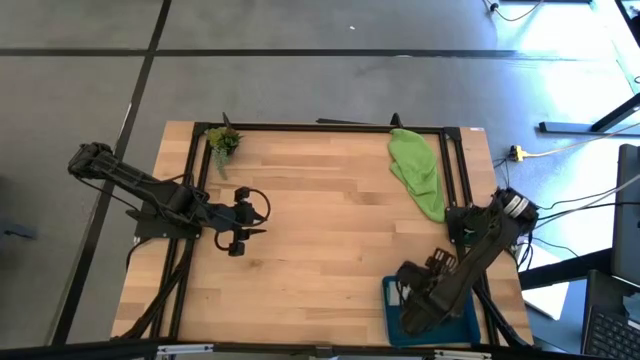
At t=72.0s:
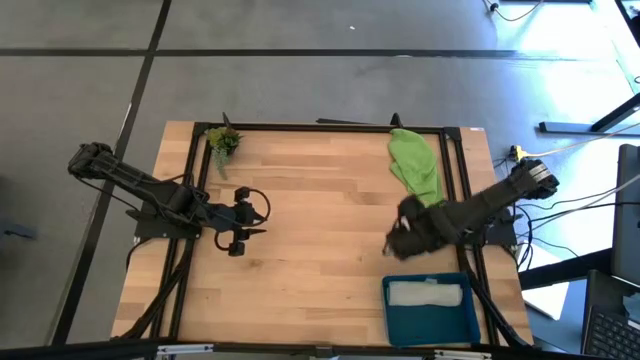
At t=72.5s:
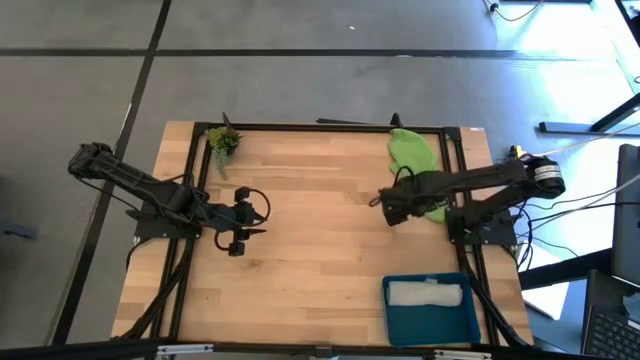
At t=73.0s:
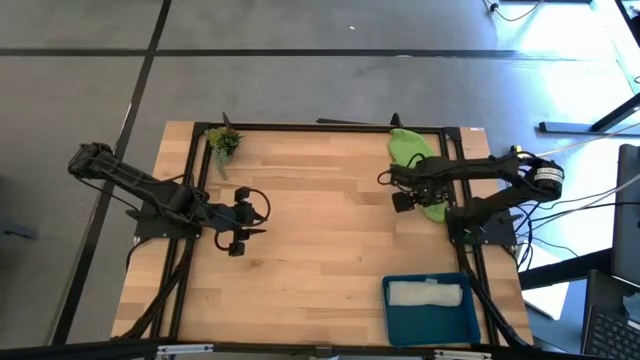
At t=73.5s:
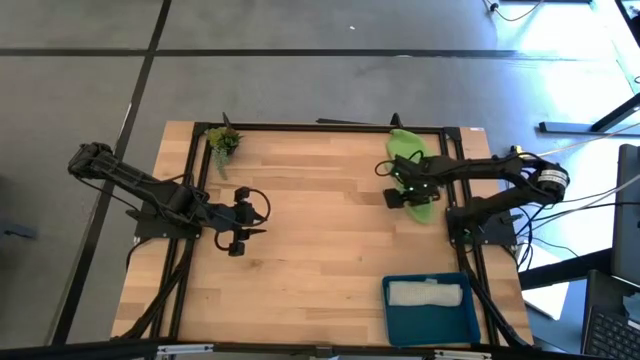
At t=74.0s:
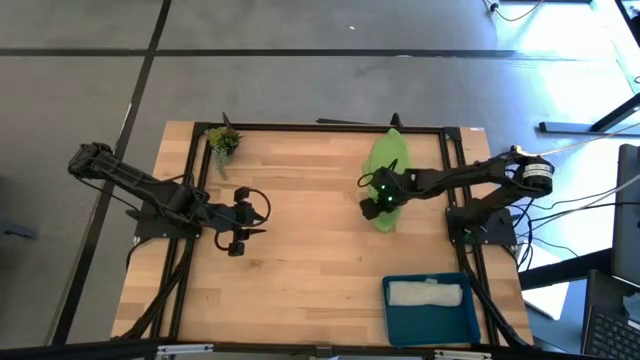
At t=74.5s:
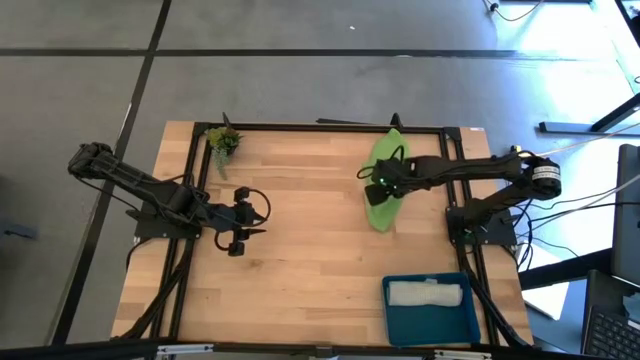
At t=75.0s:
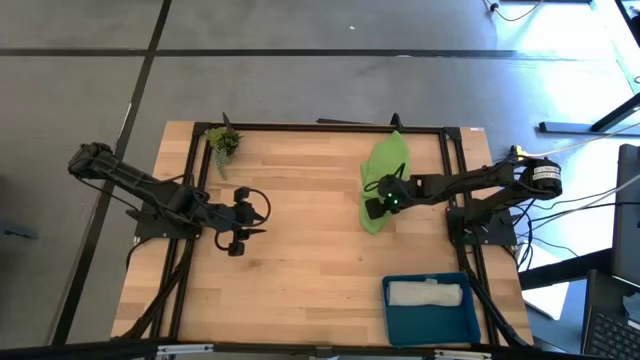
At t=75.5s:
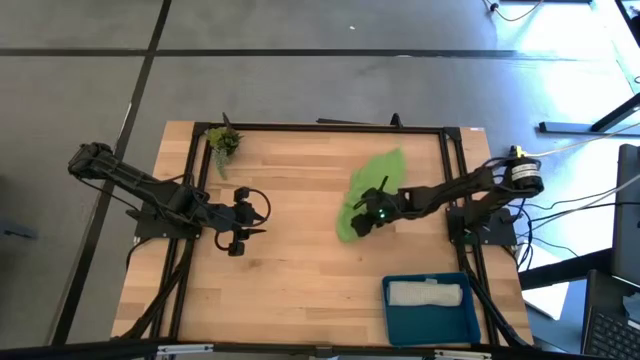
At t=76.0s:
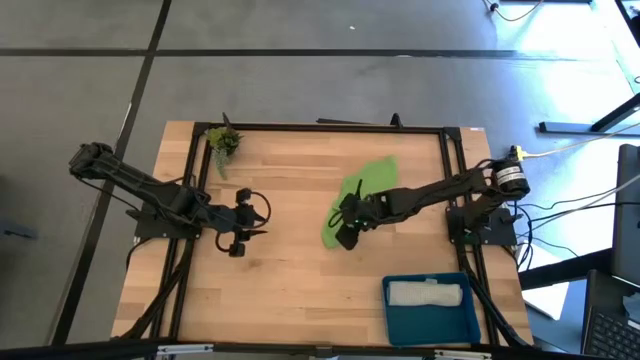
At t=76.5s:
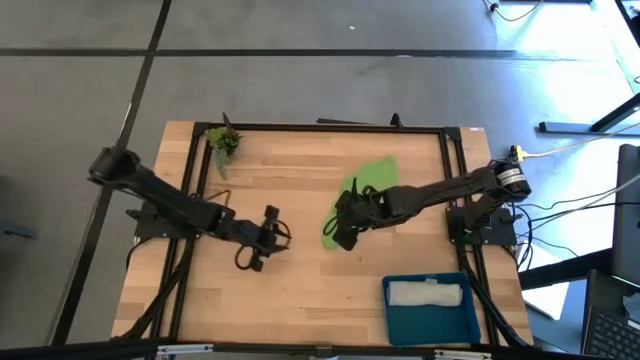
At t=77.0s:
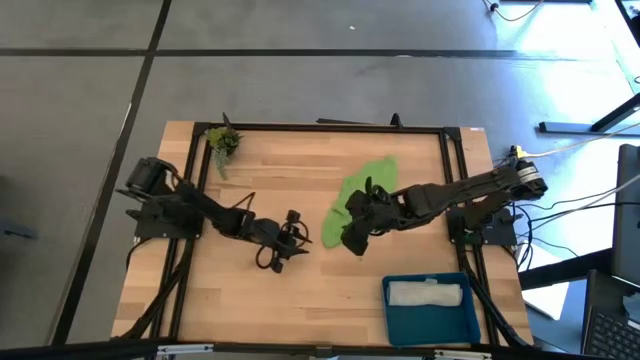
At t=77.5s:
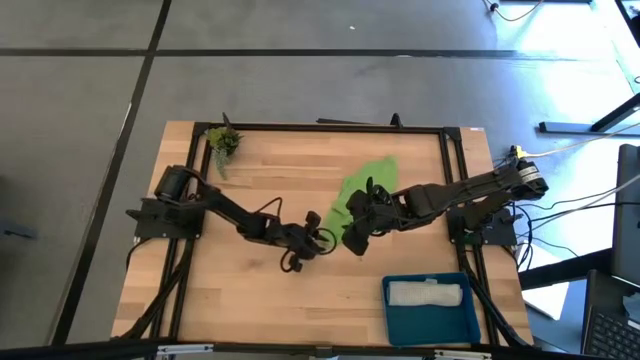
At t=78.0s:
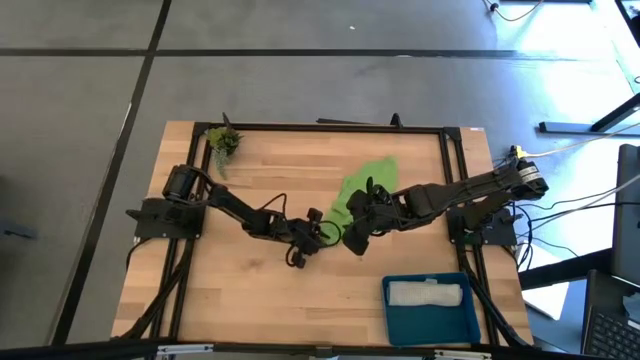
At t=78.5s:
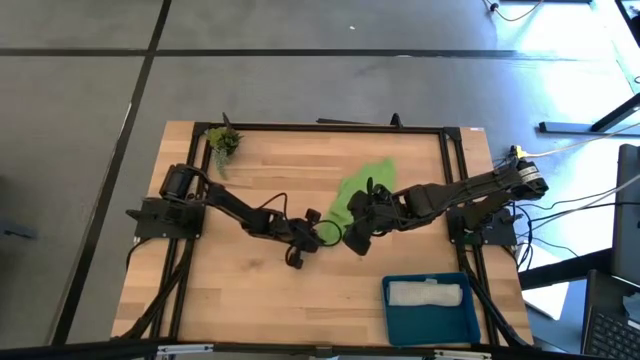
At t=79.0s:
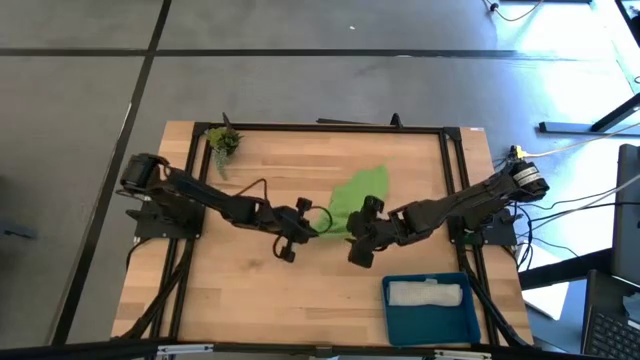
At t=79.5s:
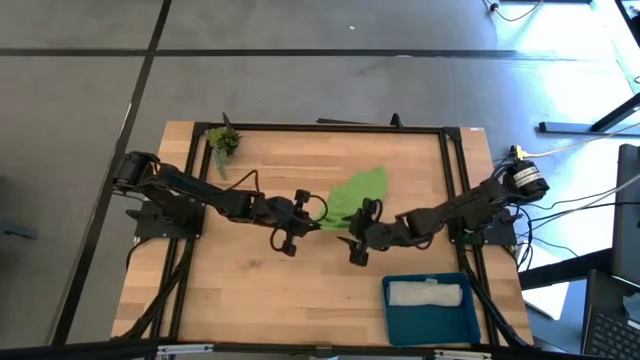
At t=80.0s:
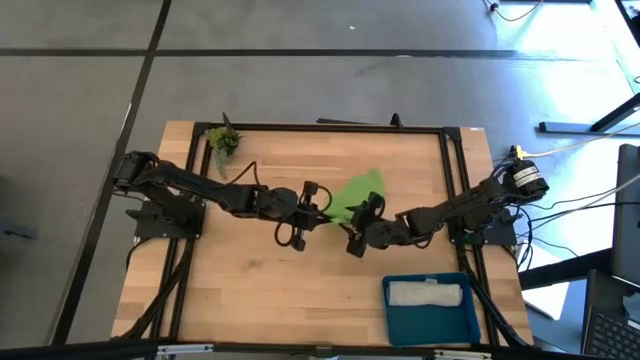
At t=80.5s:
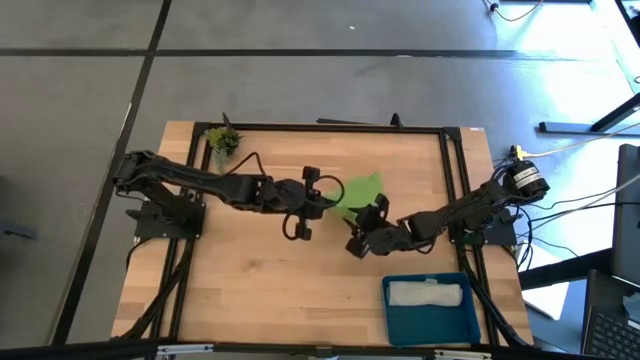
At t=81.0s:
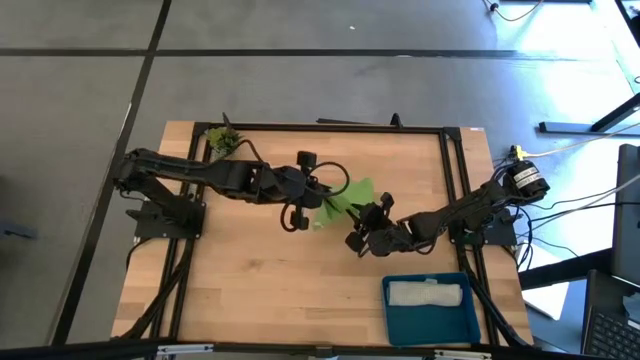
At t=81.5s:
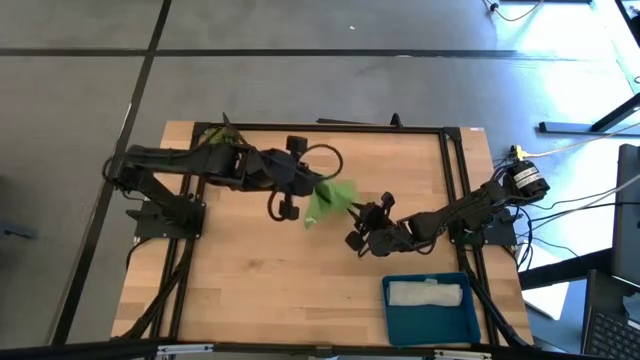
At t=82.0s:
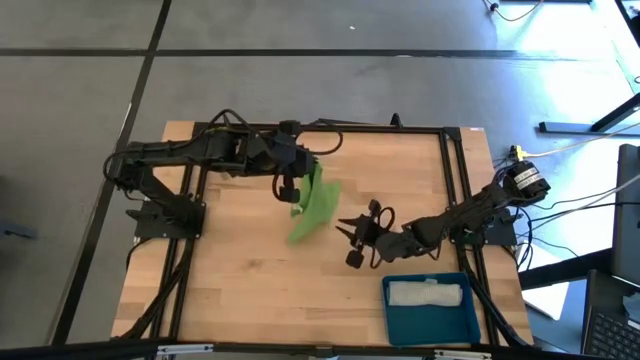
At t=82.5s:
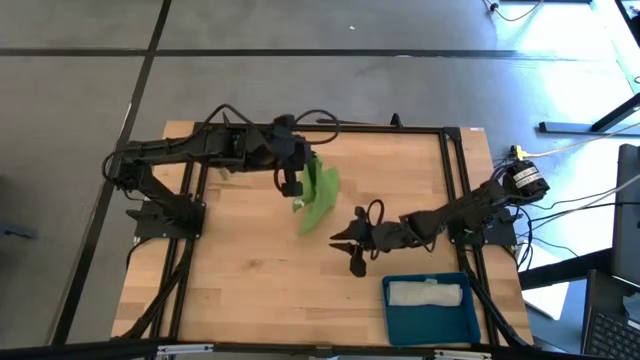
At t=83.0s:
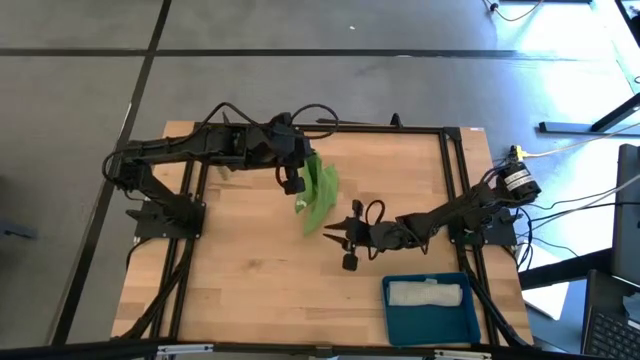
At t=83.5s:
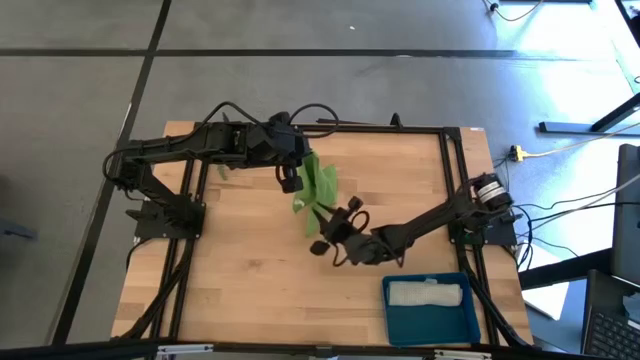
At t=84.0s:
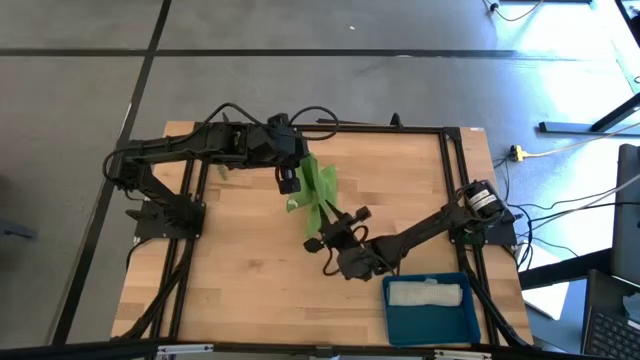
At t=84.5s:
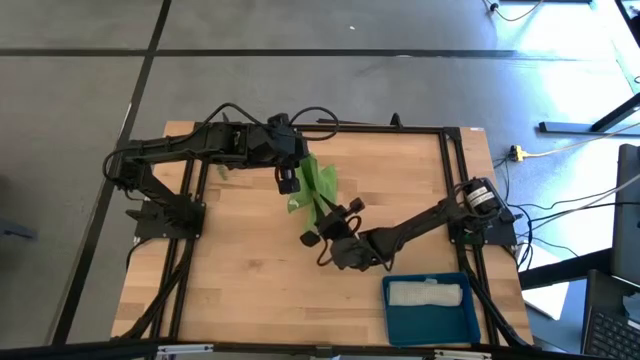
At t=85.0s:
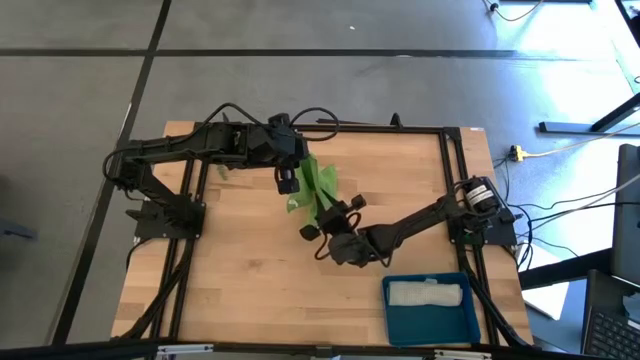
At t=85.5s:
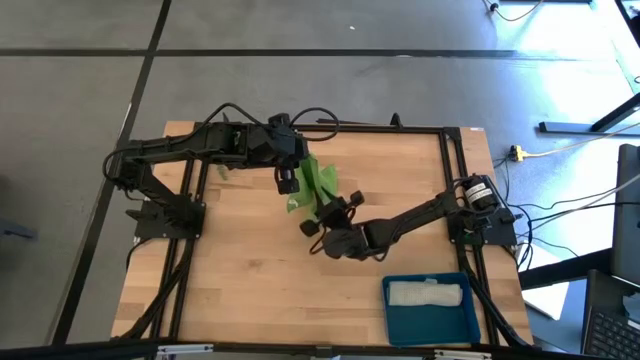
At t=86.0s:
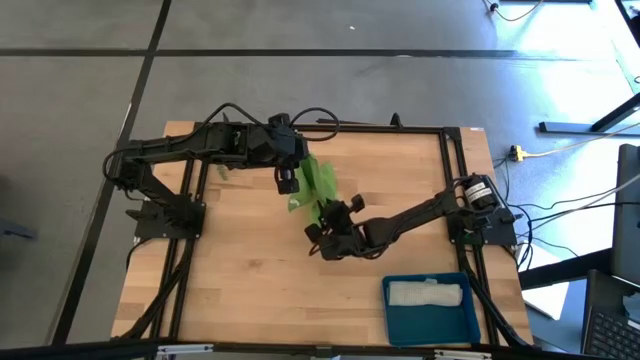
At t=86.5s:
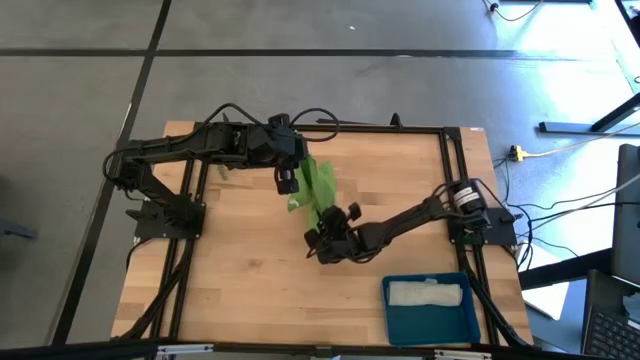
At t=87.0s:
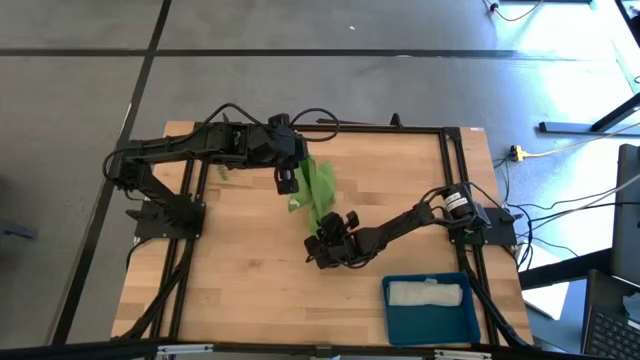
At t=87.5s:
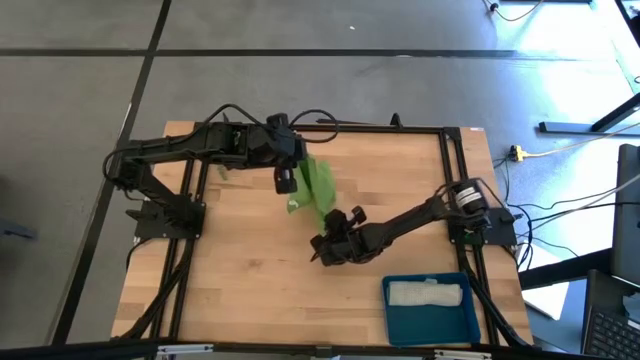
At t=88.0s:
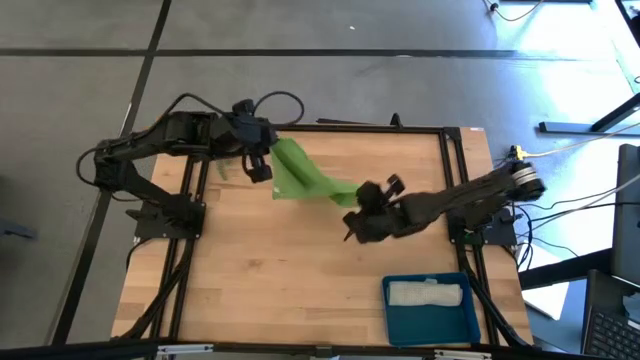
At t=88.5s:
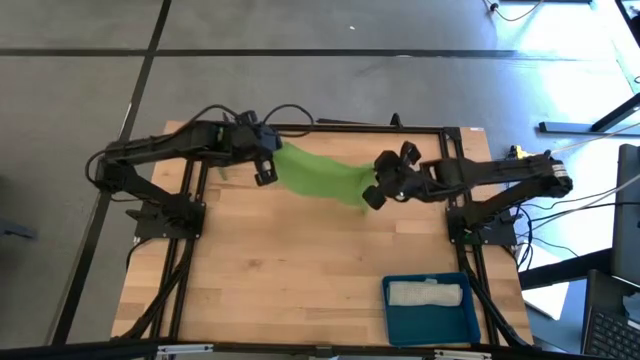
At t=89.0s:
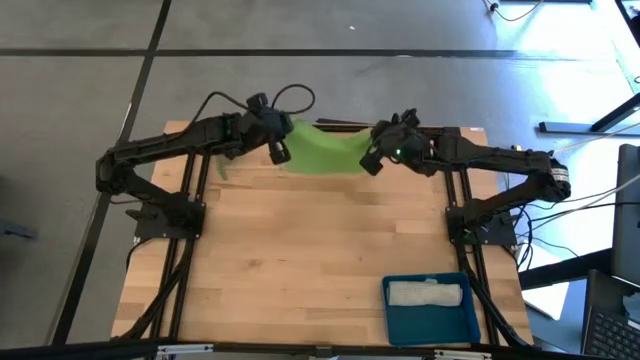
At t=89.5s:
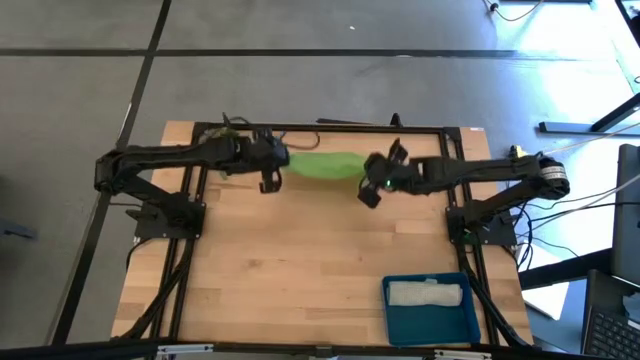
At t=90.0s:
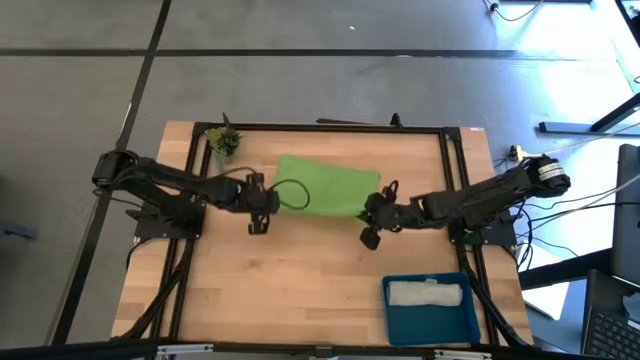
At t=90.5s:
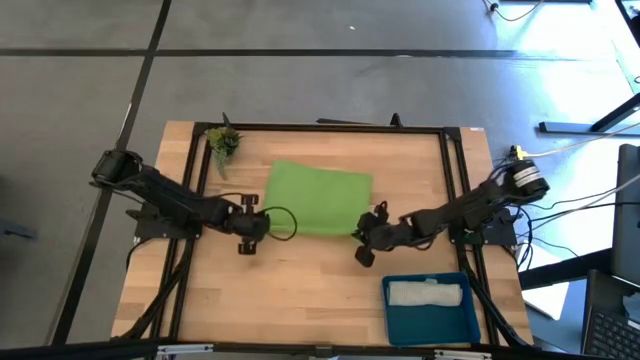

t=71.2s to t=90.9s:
Task: Roll microfiber towels into tight, uniform cylinder then place into a basket
Fold the green towel

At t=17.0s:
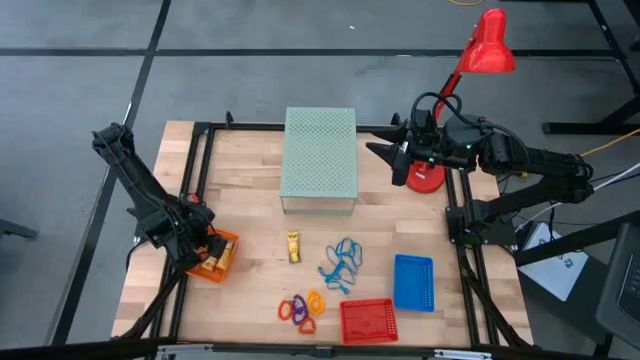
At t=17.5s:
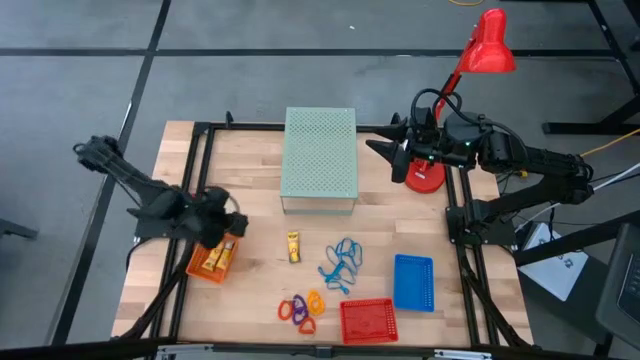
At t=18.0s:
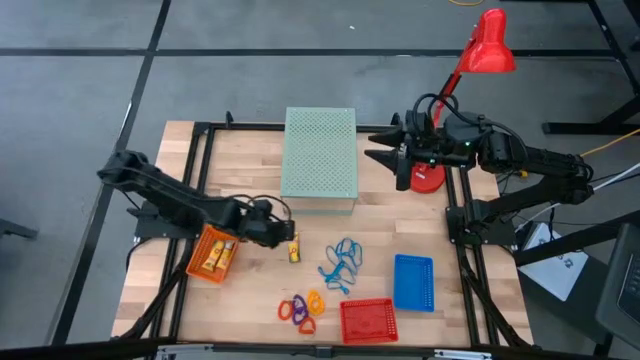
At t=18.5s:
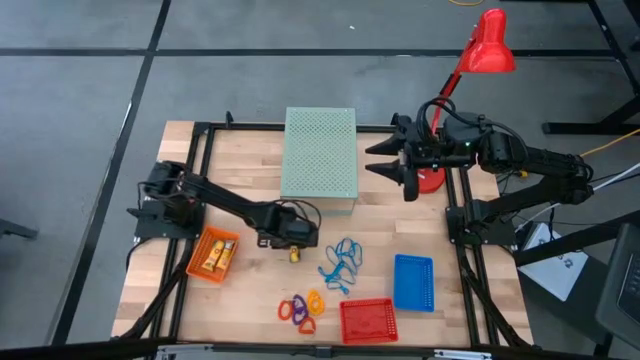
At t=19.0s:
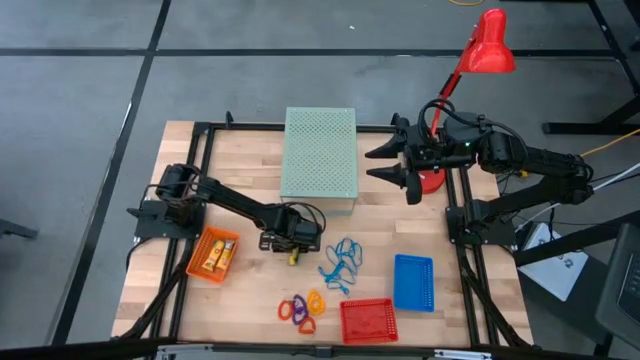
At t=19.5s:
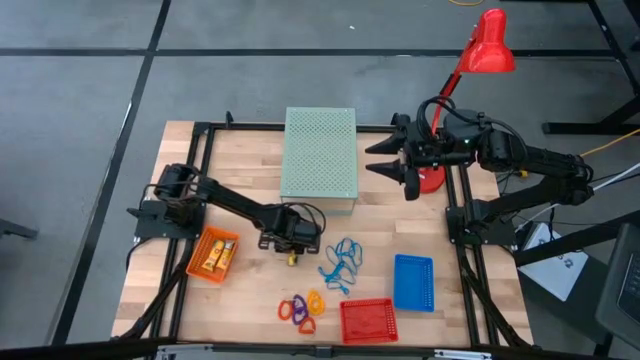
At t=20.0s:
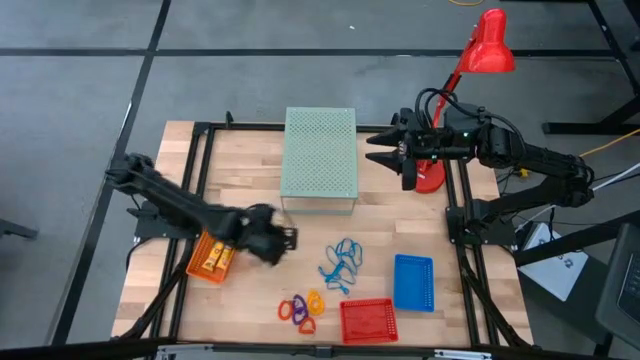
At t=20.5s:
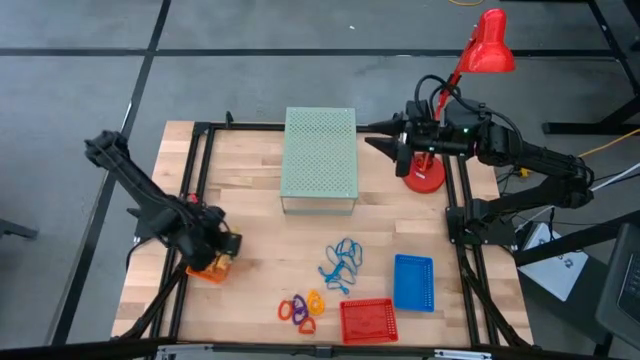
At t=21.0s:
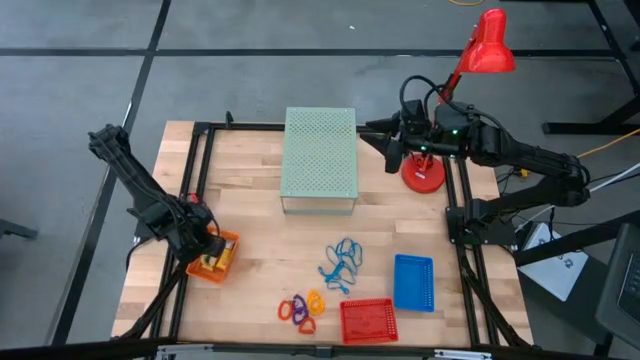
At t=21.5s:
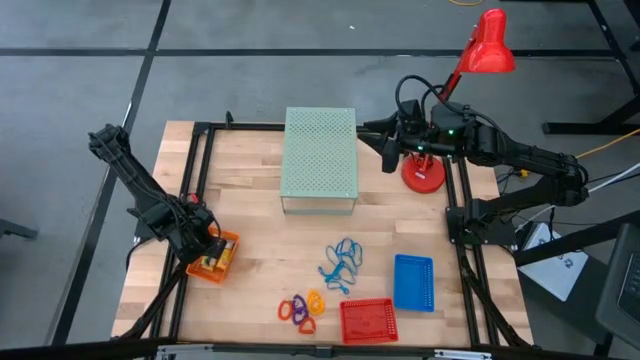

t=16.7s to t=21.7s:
Task: Pick & Place Office Desk Supplies
Put the yellow crayon box into the orange bin
